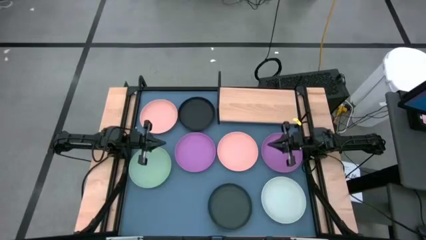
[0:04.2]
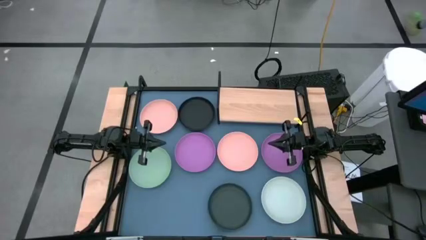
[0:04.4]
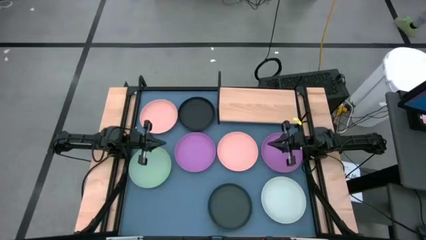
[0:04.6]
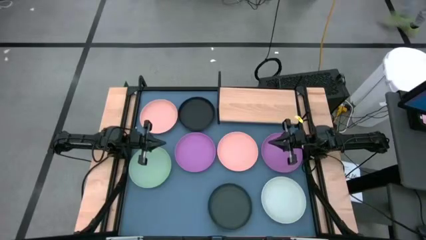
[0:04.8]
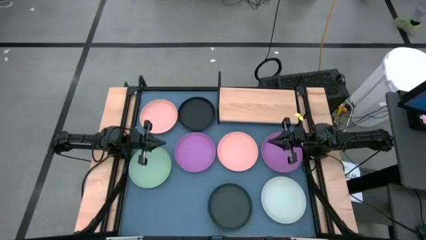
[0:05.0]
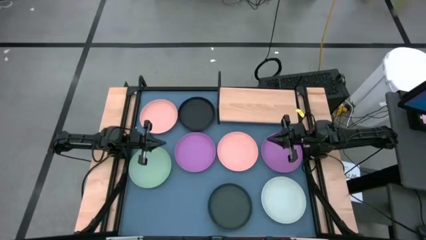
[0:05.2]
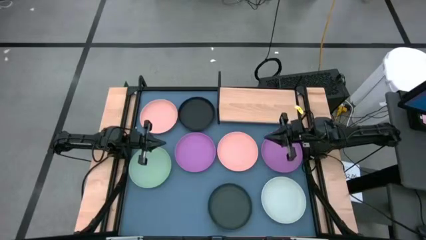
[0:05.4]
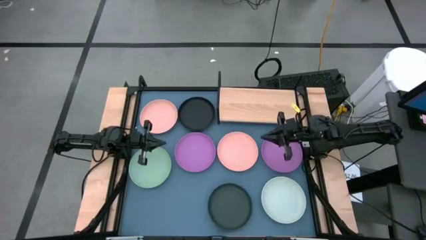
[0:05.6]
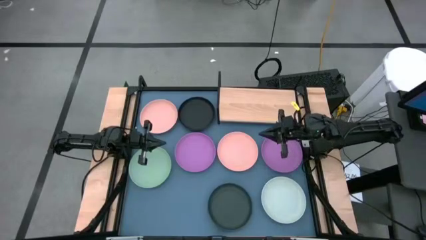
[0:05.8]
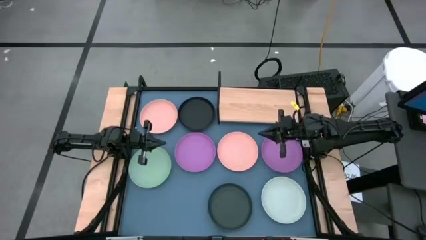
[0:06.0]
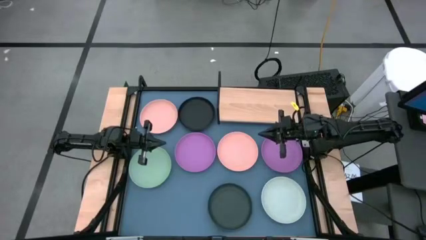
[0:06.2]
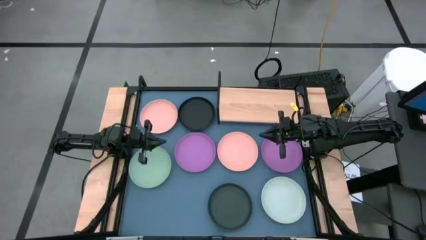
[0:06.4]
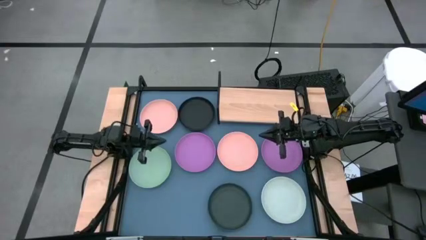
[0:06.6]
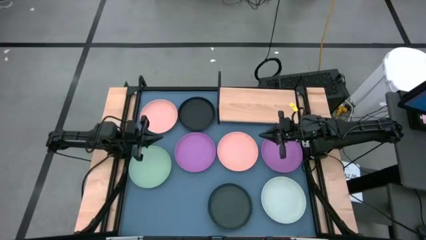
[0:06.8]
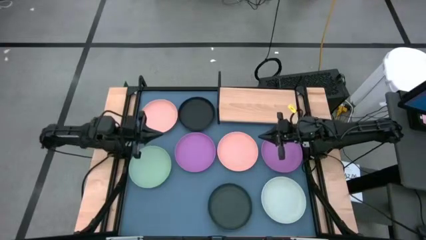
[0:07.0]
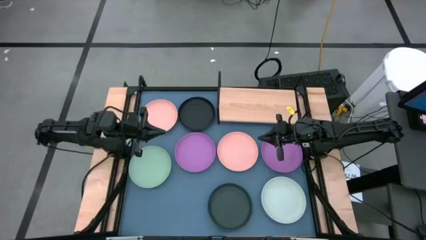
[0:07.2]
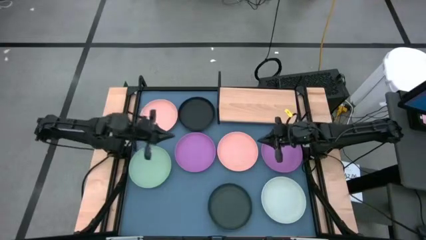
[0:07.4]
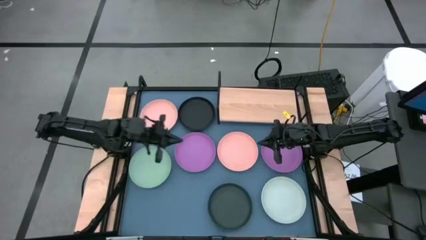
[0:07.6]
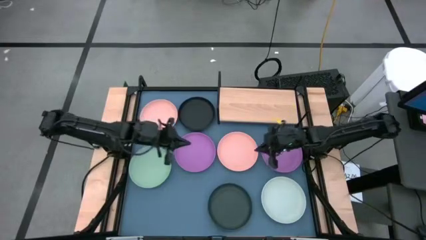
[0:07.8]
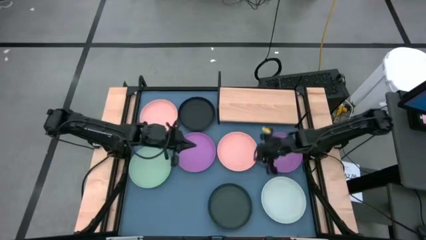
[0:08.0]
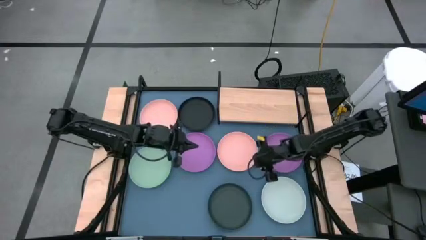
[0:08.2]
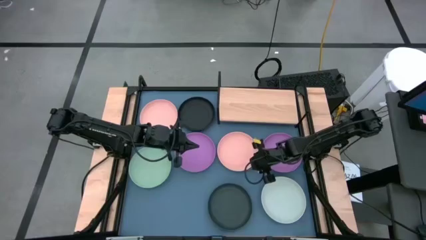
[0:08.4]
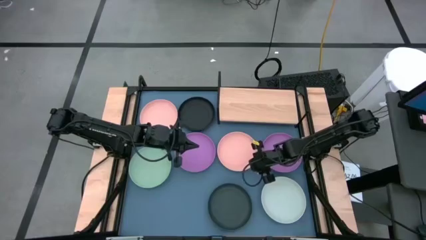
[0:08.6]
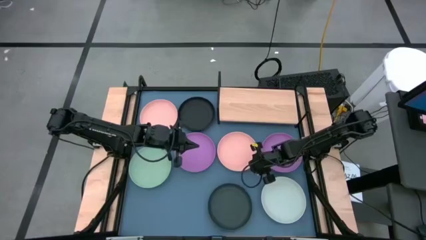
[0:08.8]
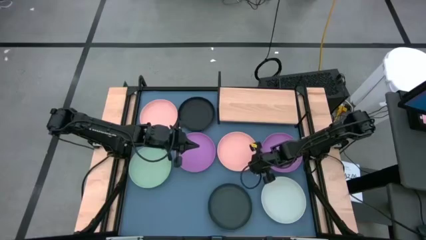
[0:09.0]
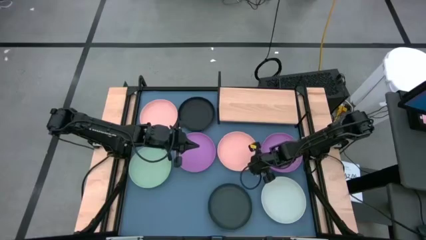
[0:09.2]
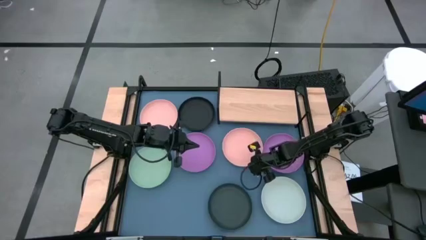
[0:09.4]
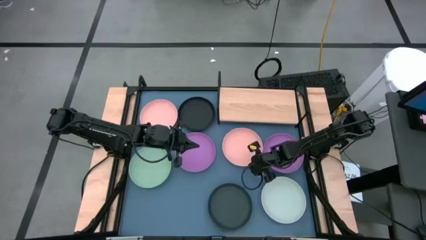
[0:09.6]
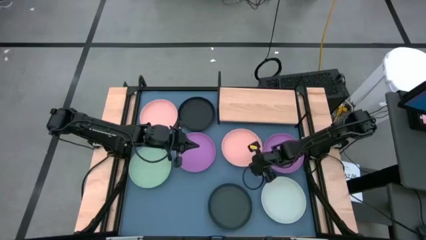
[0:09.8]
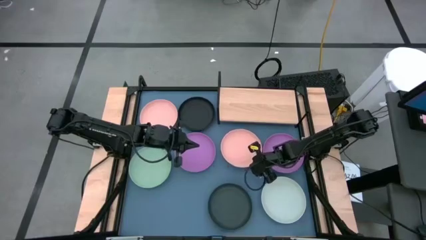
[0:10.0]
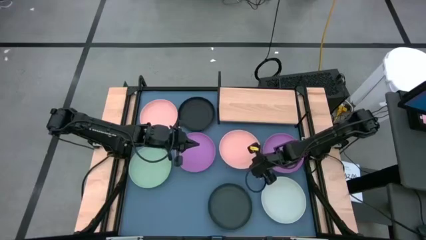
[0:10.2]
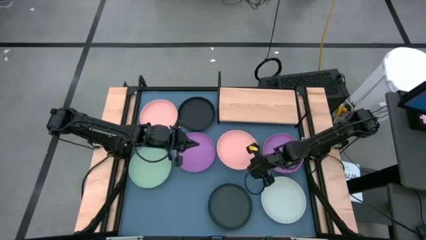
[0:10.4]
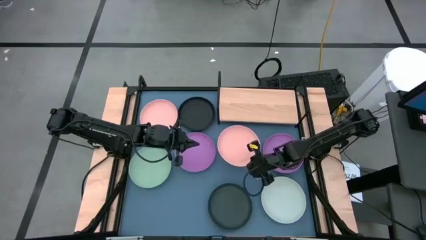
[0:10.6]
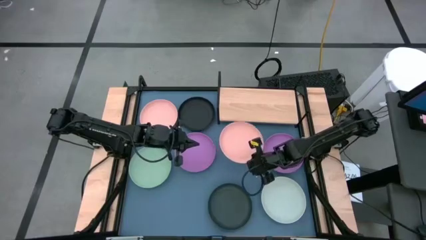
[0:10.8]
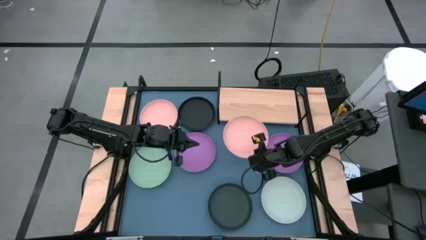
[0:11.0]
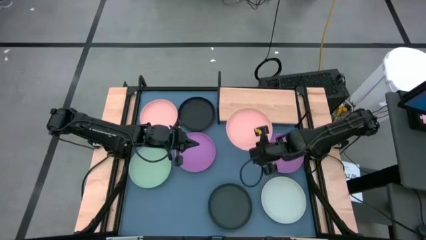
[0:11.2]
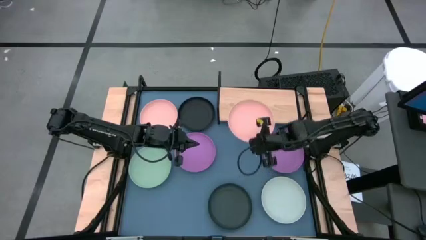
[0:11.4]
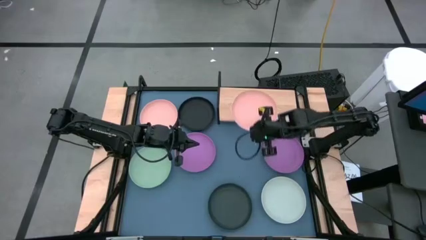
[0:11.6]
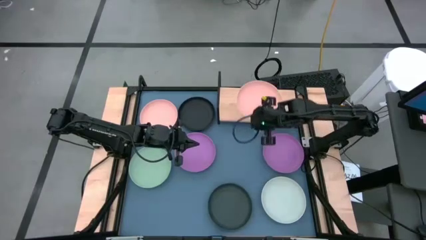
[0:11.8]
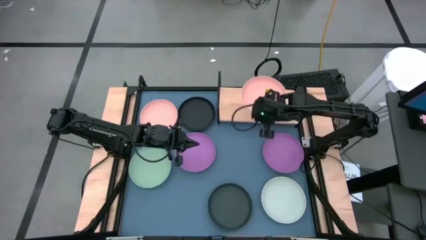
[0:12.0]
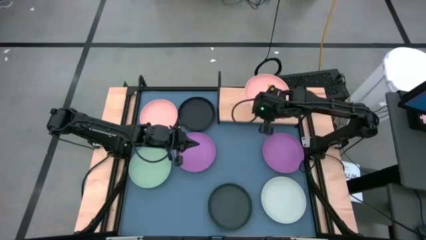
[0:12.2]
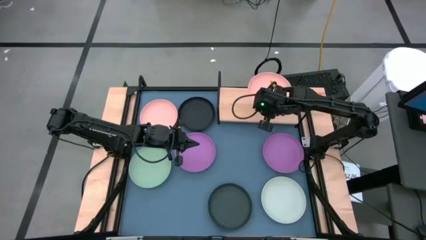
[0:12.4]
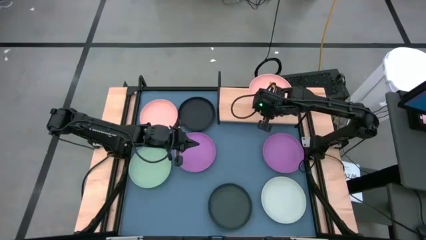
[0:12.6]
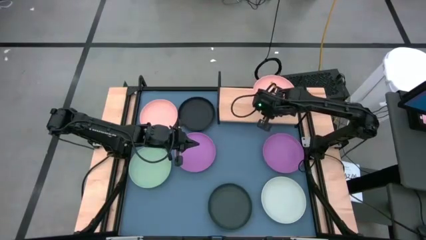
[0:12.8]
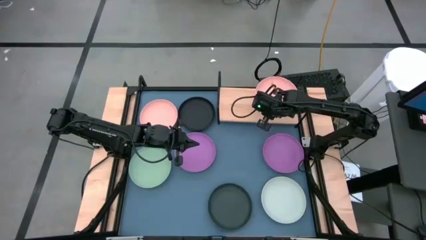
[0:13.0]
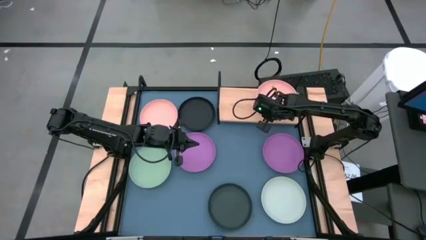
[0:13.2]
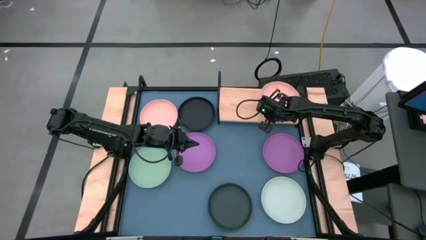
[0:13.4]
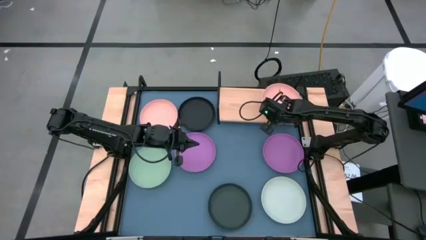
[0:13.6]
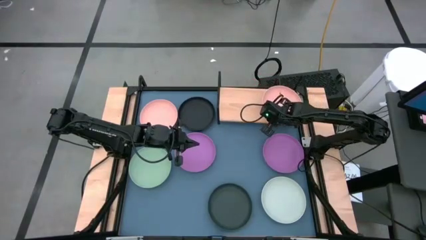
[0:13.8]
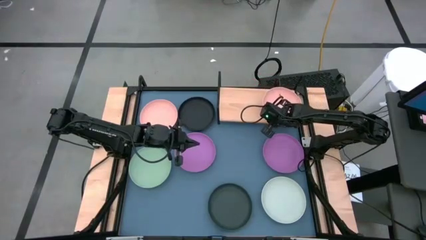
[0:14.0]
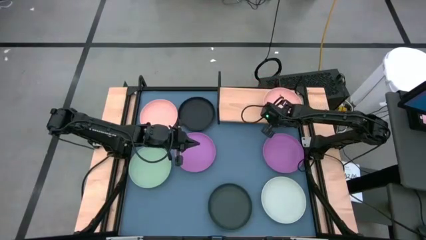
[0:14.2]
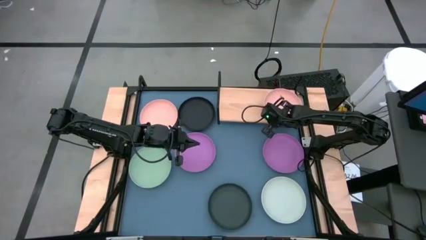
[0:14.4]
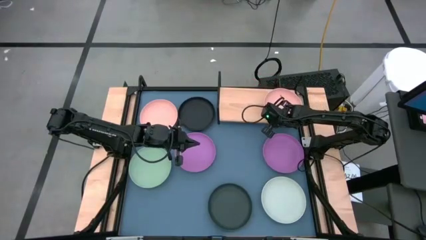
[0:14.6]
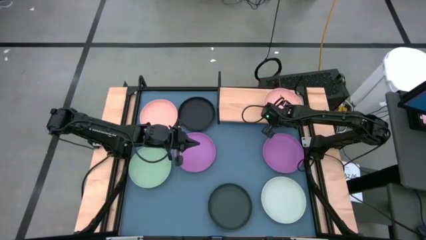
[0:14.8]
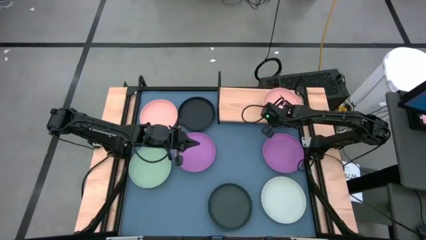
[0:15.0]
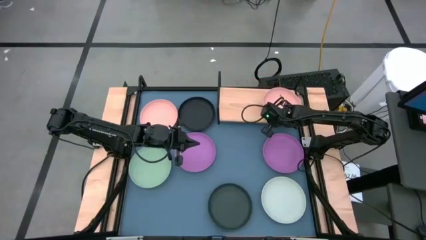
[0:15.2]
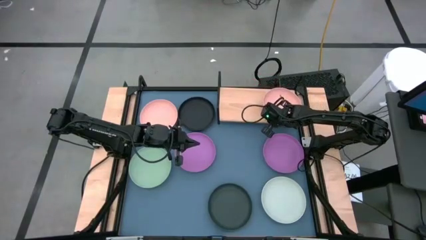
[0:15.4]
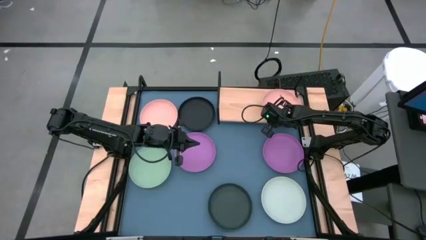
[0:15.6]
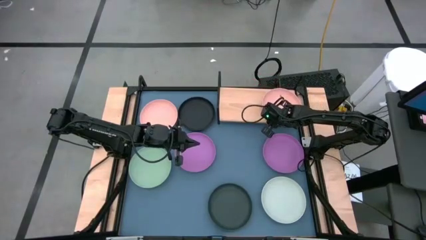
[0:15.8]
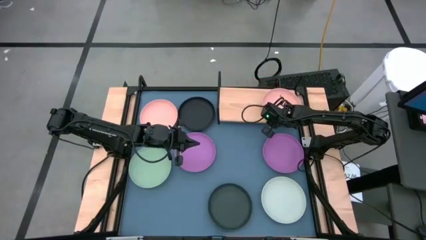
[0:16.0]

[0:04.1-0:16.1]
Task: Place and stack plates onto a shelf
Put the bottom pink plate on the shelf
